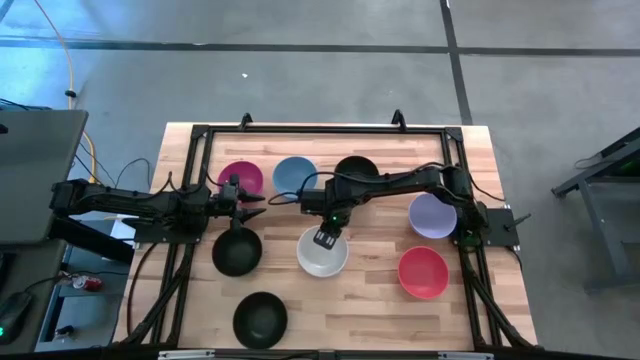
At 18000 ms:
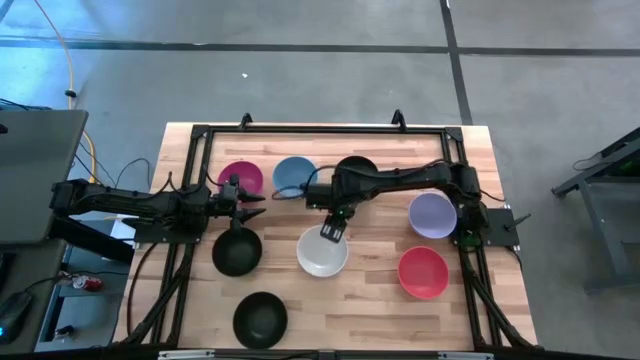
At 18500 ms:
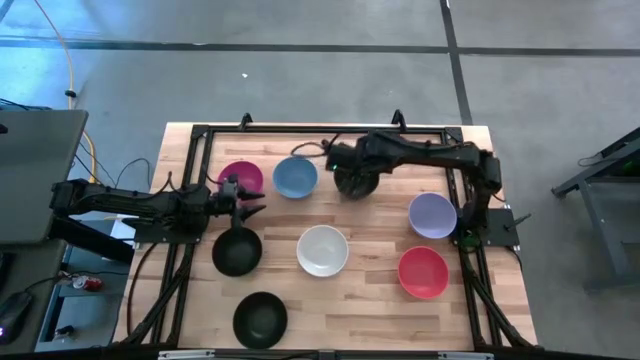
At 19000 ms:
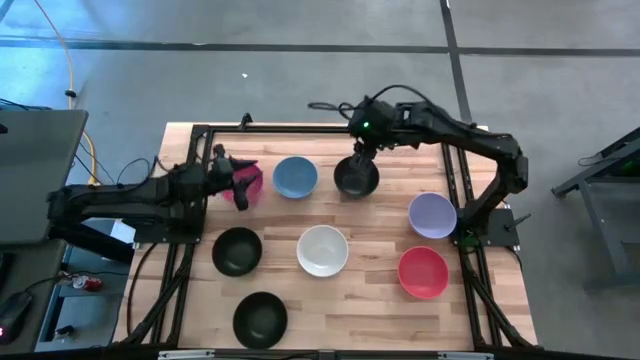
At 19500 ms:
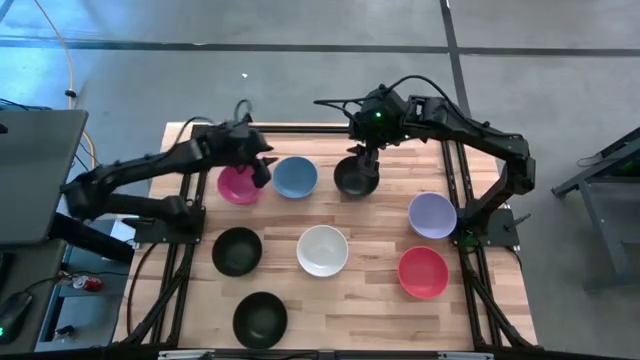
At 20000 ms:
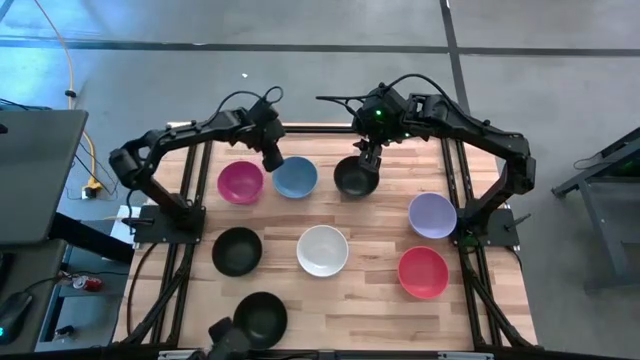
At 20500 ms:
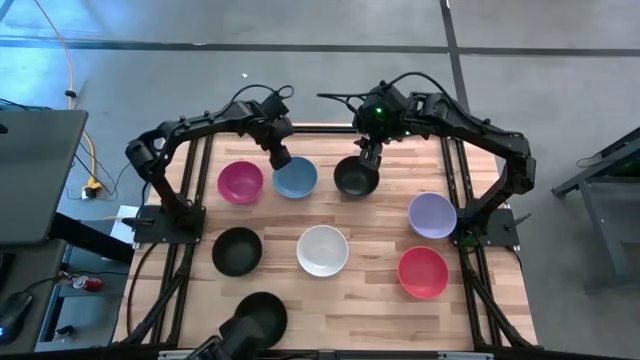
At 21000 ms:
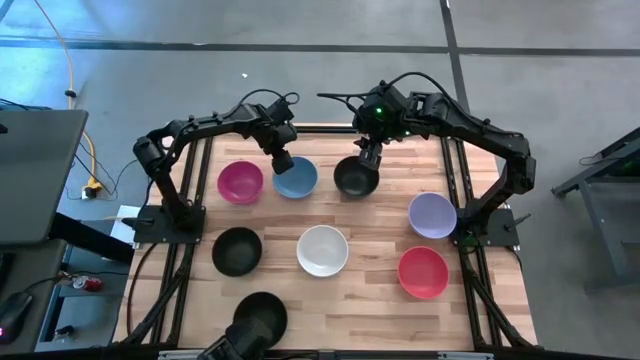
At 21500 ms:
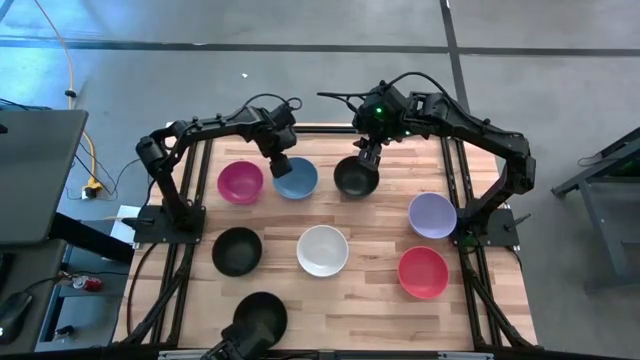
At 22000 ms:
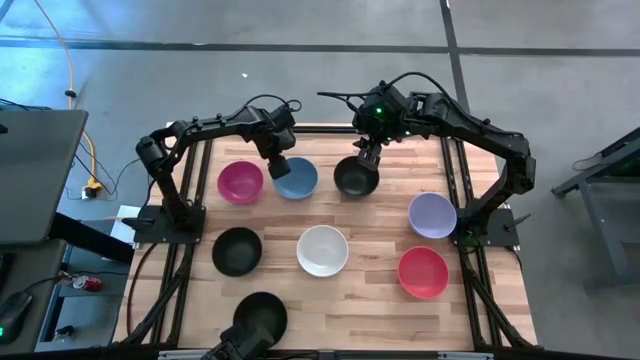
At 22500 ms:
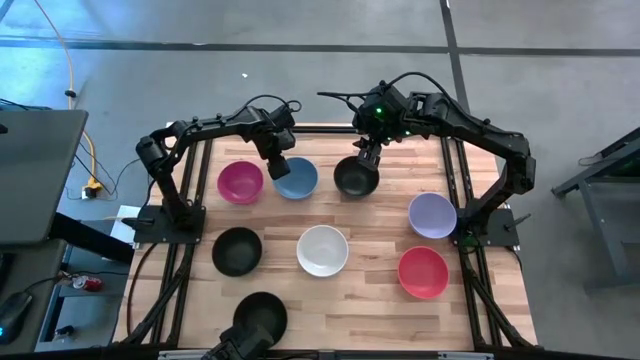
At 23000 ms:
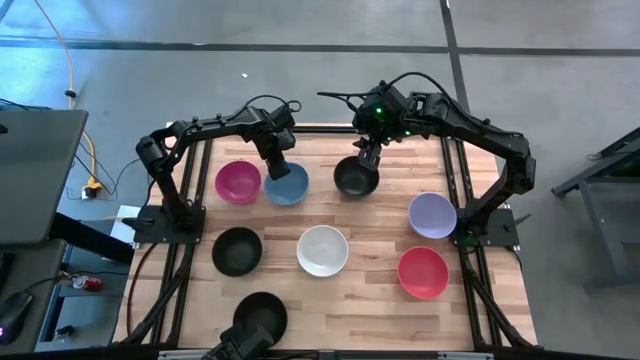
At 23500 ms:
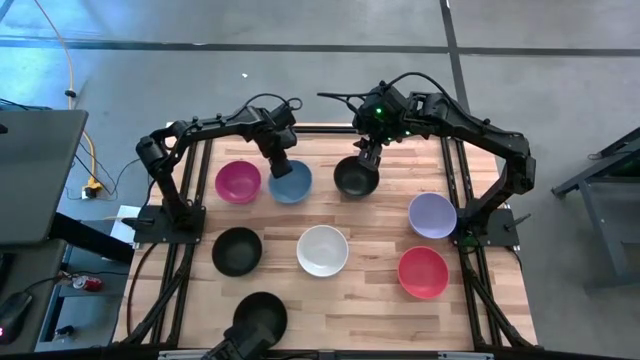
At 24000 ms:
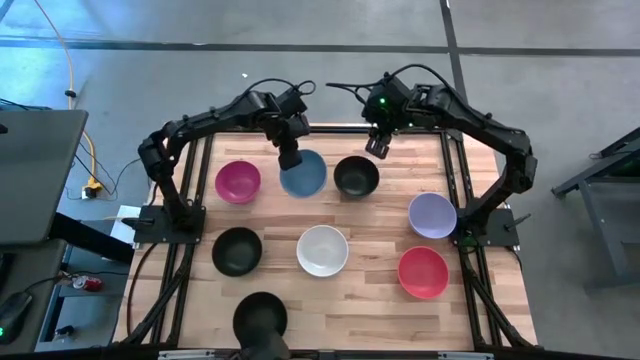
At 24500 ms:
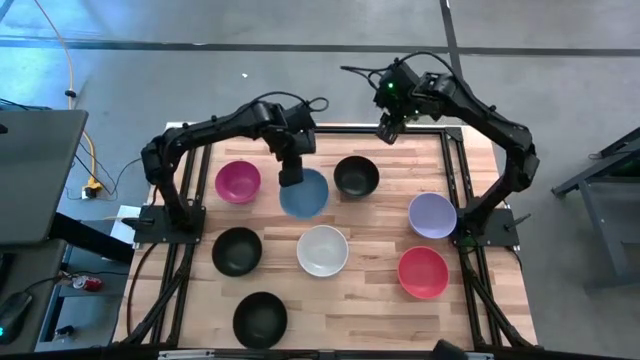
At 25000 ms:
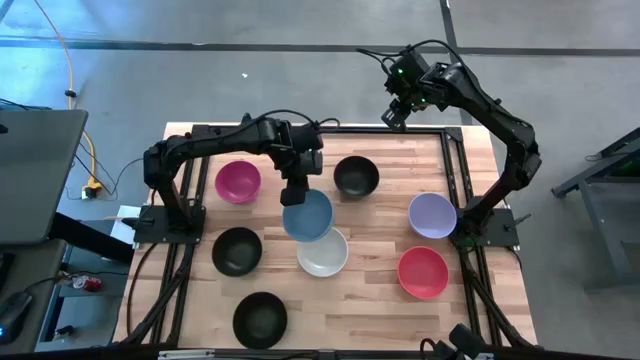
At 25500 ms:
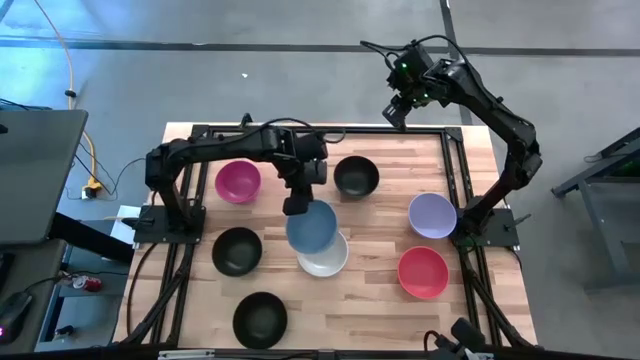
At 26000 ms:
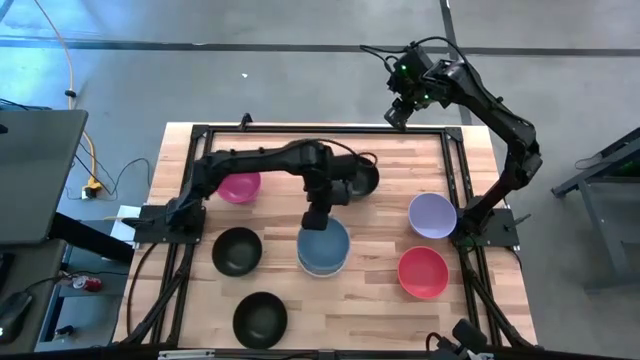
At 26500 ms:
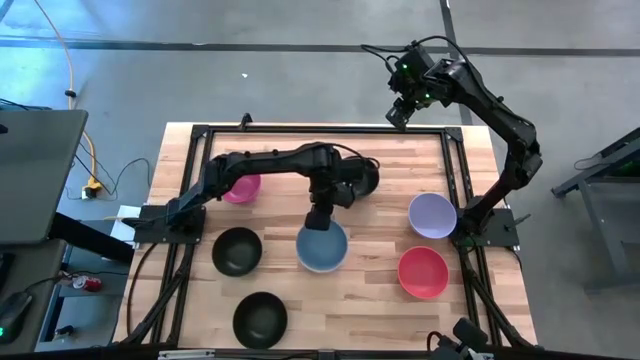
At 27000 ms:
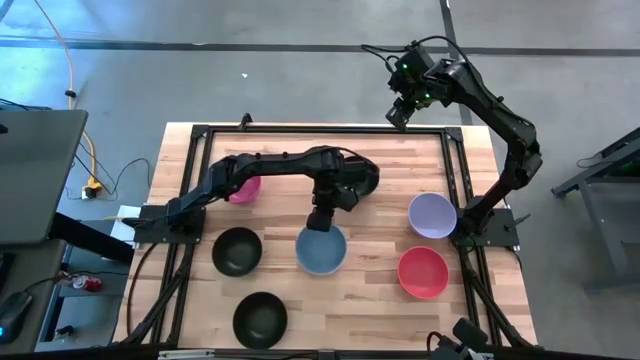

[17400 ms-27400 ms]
Task: Nest bowls inside each other
Stack the blue bowl on top of the white bowl

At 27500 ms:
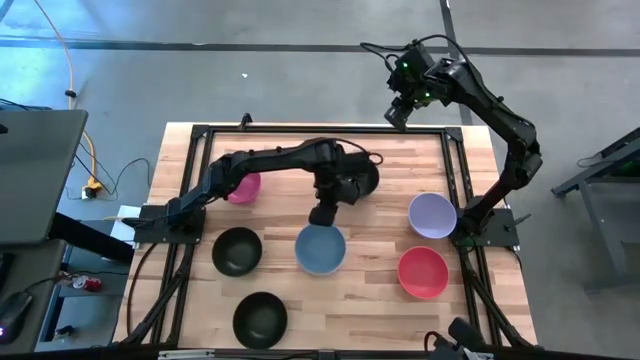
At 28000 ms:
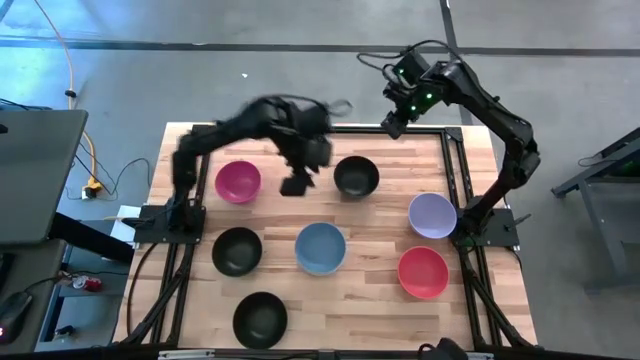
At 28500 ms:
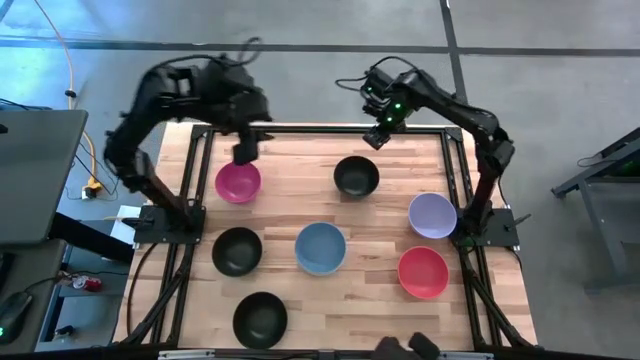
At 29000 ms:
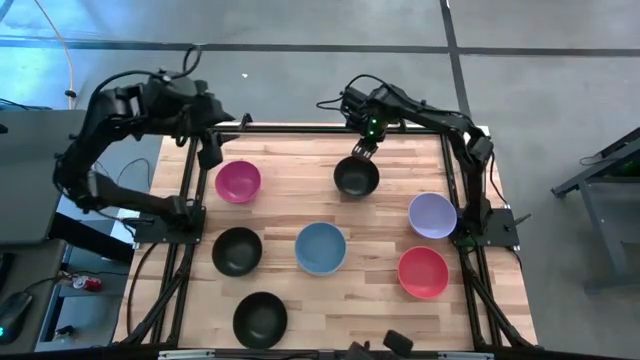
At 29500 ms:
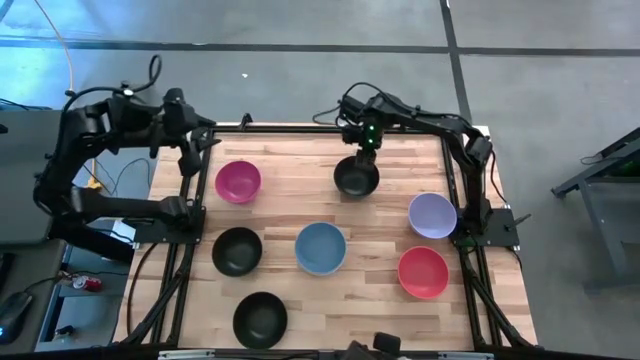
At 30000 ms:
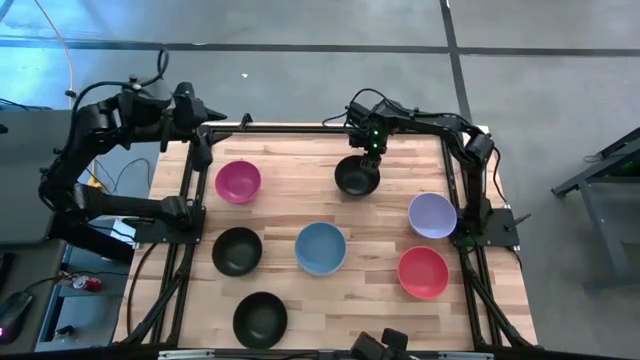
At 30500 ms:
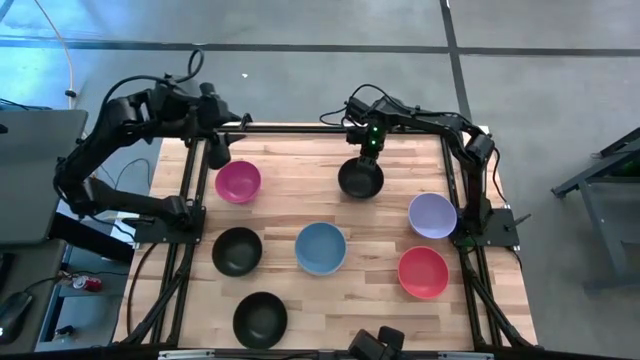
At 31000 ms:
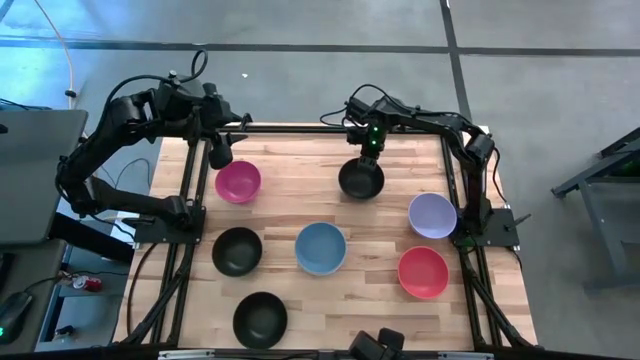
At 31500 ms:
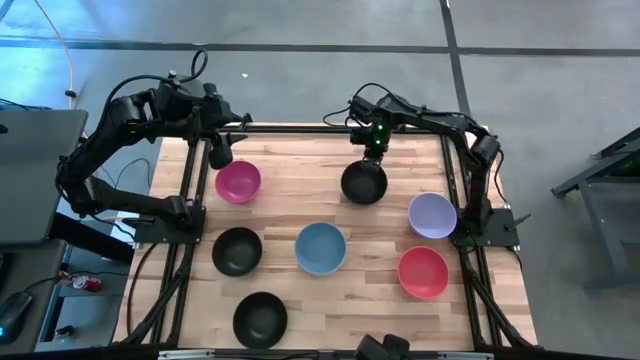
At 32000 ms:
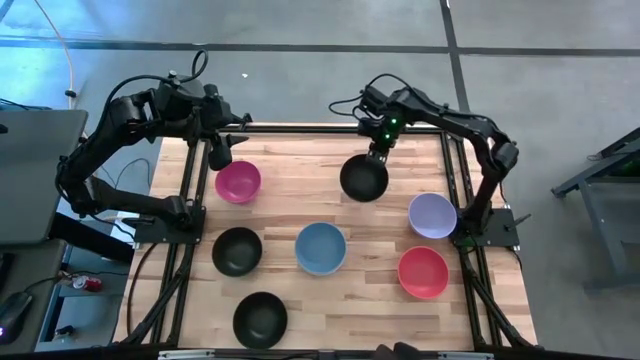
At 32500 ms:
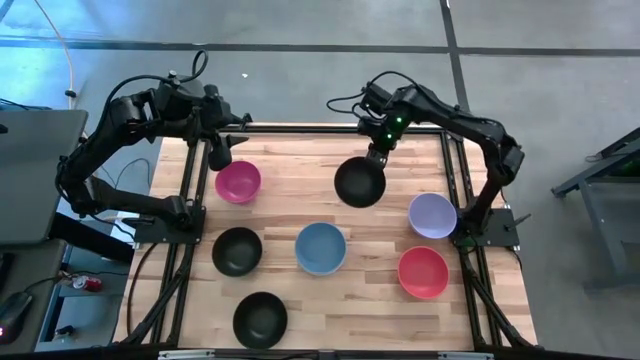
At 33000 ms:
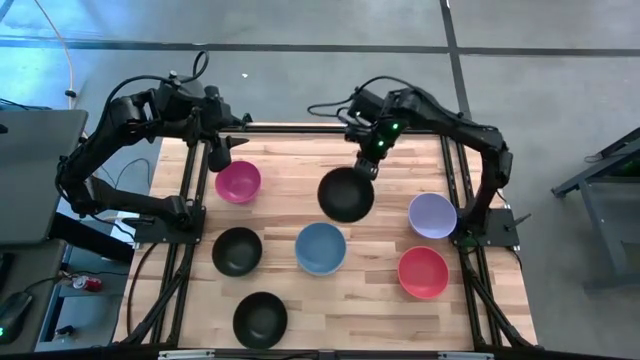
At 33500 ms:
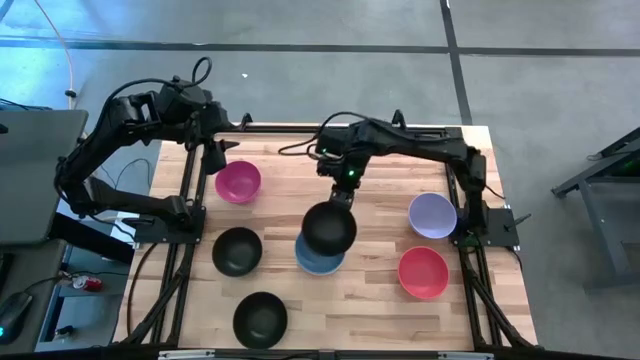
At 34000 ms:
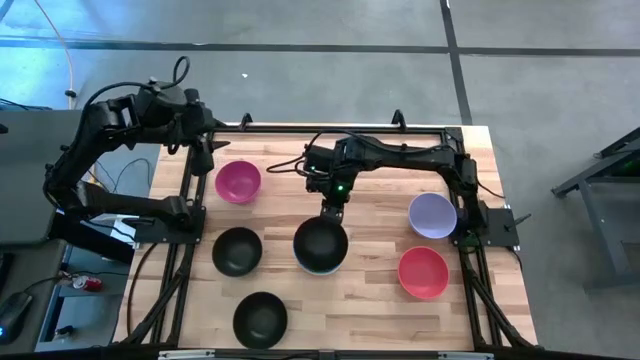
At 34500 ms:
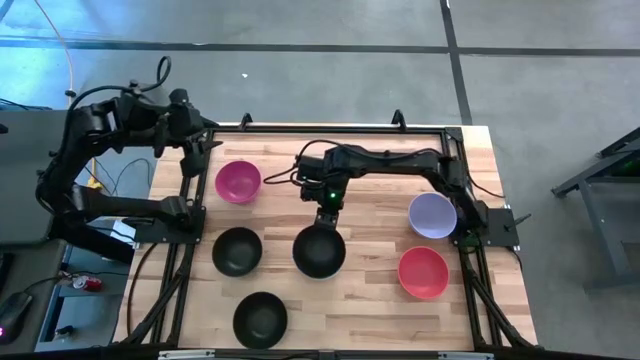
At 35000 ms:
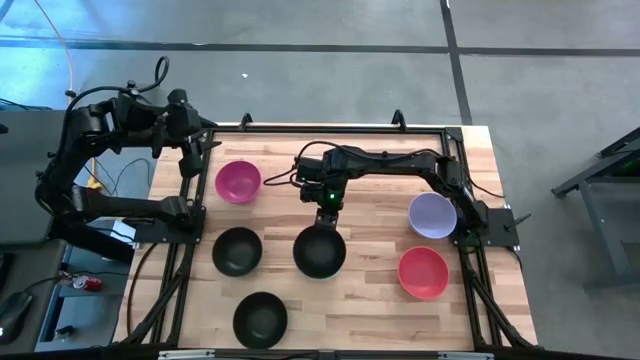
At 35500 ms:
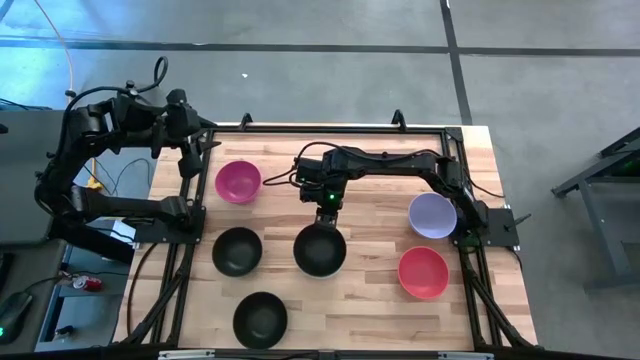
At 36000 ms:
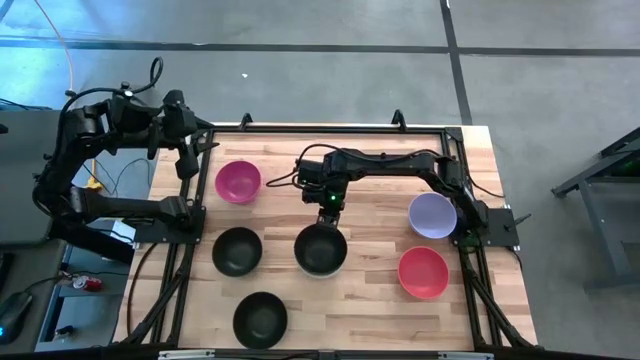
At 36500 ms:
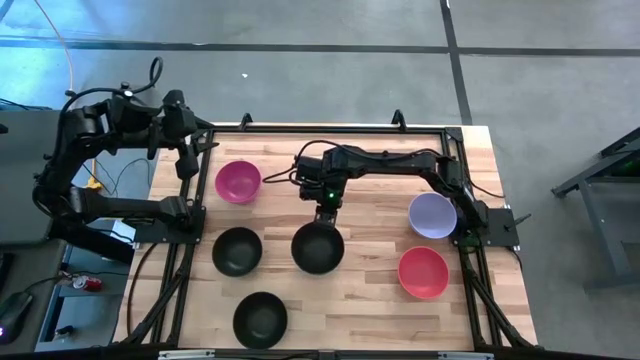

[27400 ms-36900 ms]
Stack the top black bowl on top of the blue bowl

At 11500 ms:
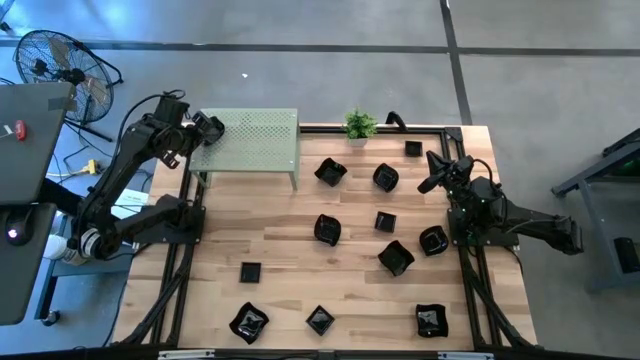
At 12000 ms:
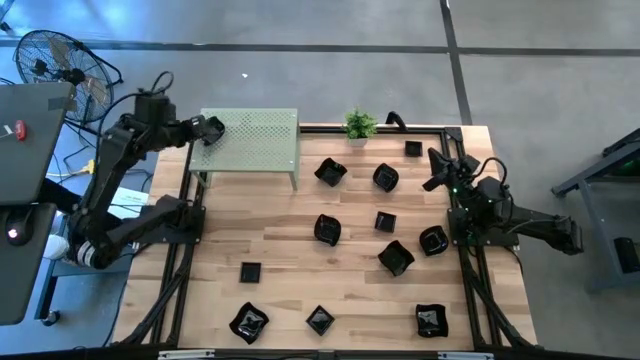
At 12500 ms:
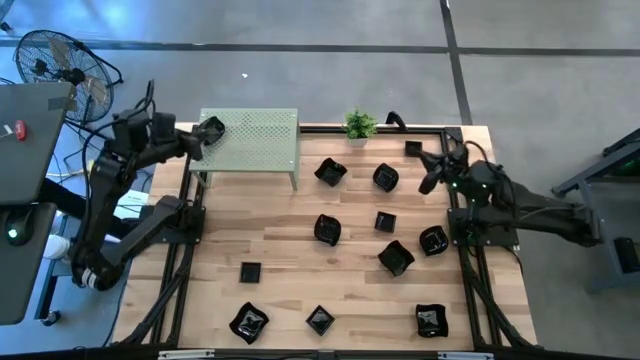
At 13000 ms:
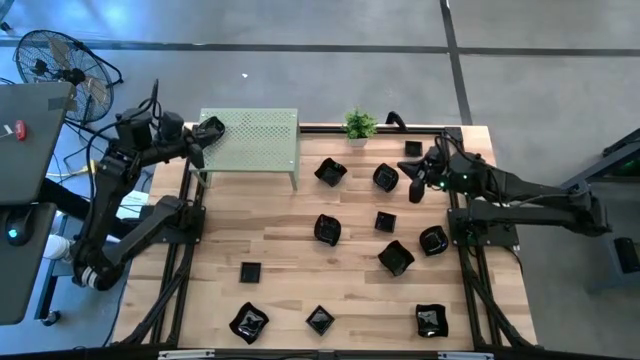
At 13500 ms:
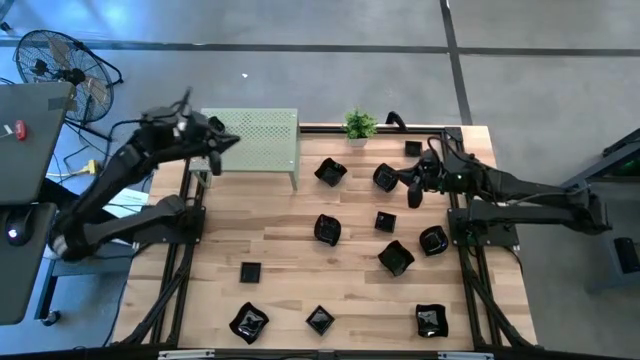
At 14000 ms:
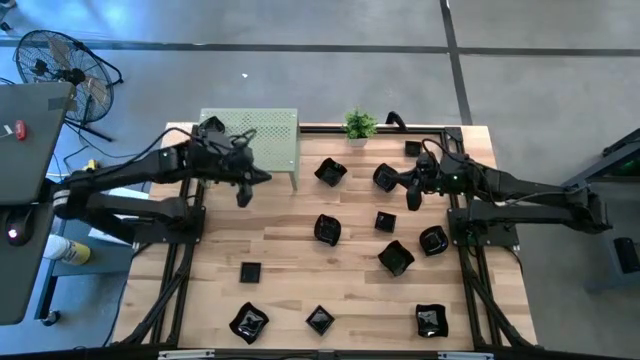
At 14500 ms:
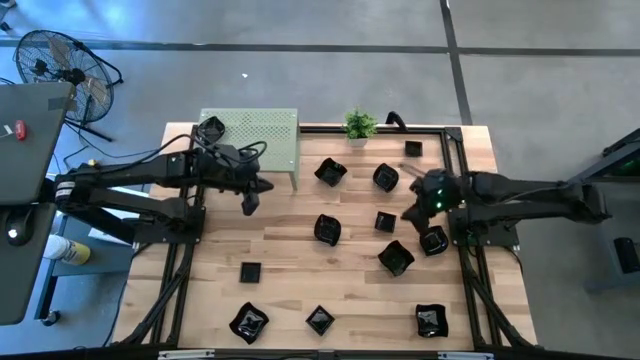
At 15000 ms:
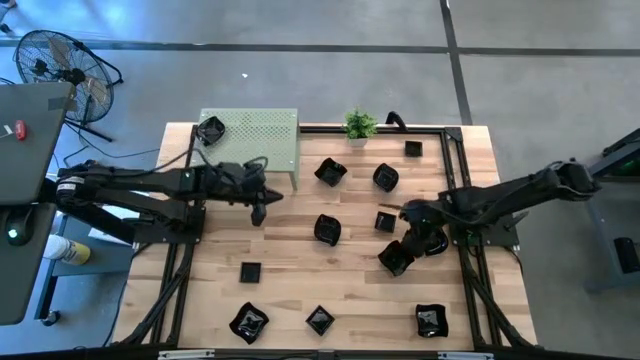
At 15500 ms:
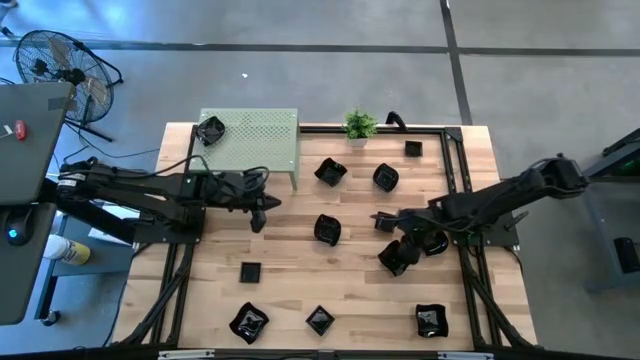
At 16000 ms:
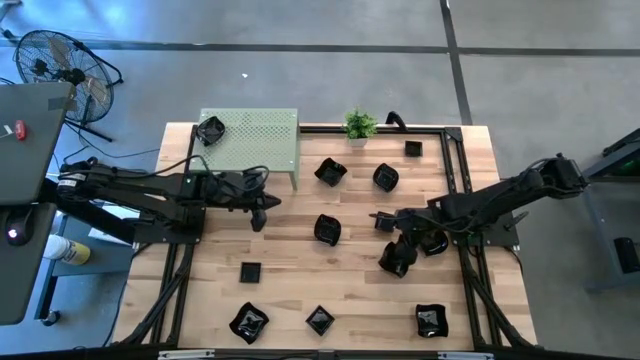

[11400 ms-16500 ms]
Task: Pick & Place Mini shaped plates
Put the black distorted square plate on the right shelf
